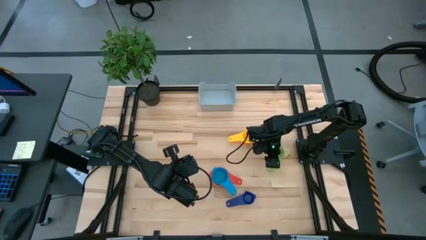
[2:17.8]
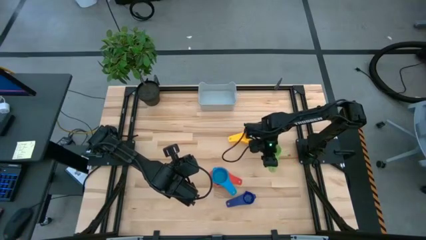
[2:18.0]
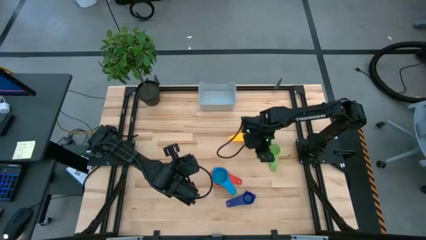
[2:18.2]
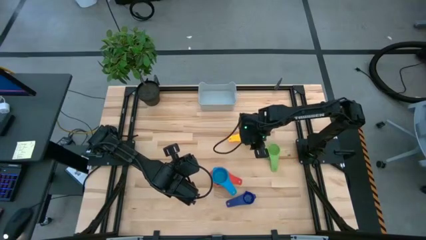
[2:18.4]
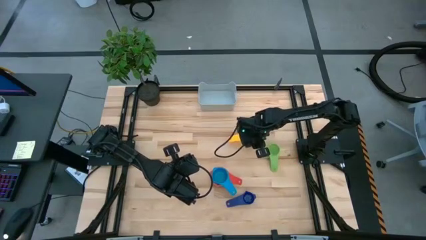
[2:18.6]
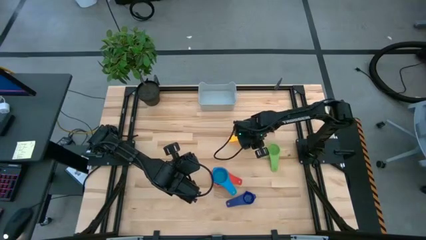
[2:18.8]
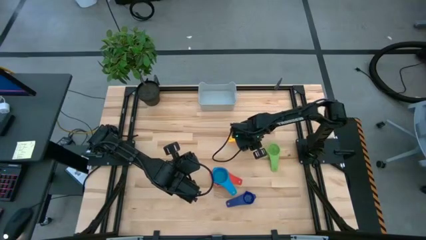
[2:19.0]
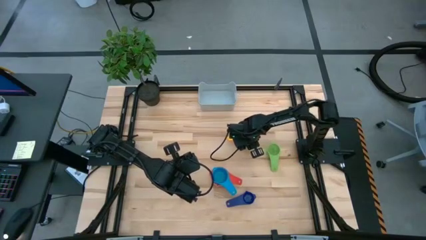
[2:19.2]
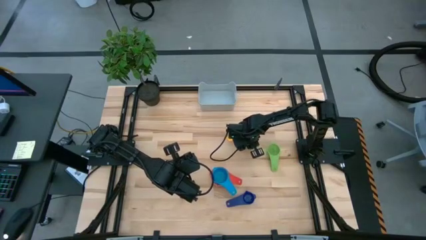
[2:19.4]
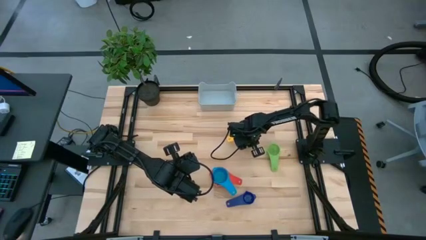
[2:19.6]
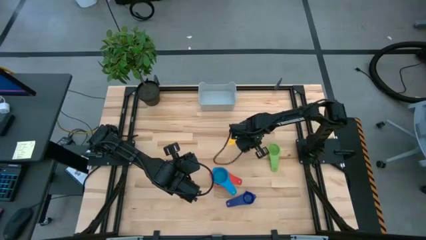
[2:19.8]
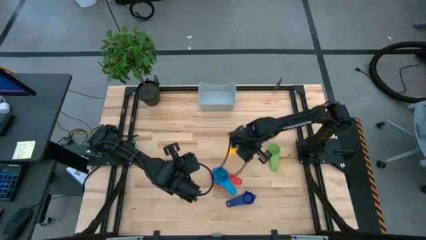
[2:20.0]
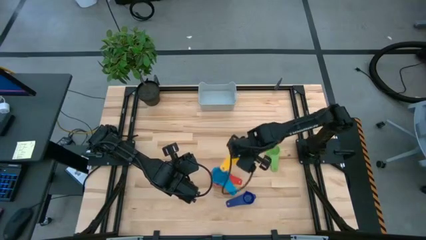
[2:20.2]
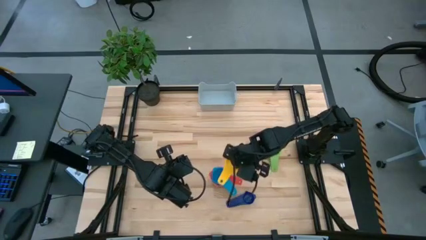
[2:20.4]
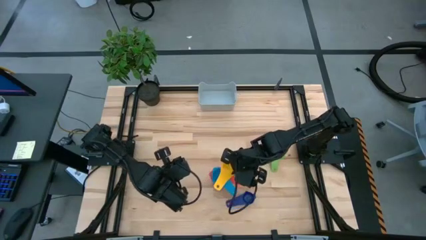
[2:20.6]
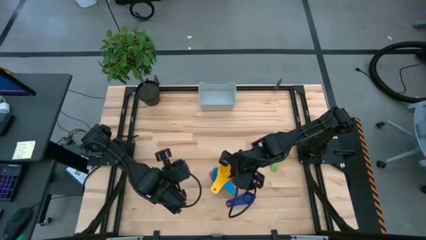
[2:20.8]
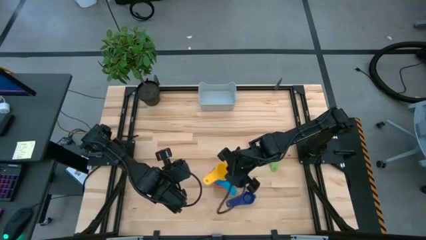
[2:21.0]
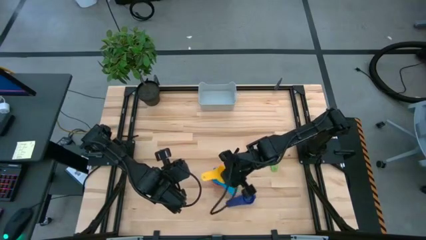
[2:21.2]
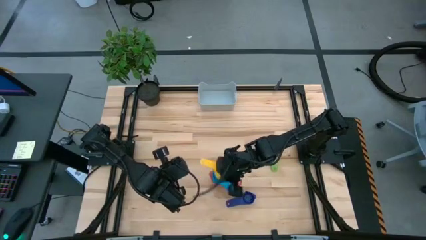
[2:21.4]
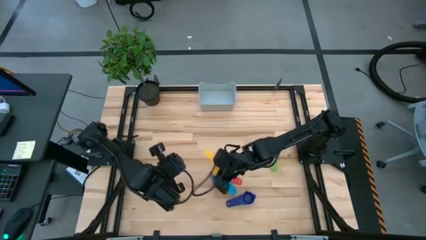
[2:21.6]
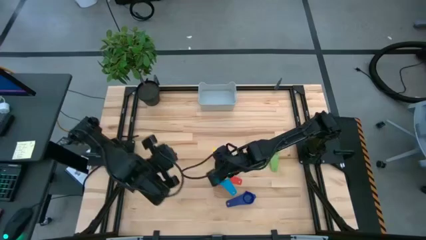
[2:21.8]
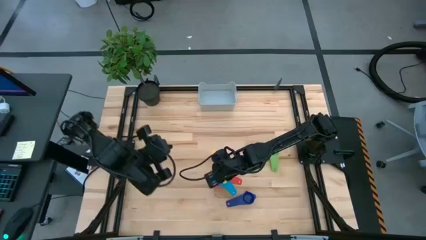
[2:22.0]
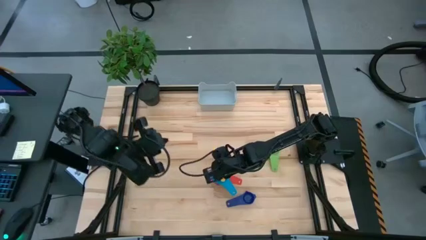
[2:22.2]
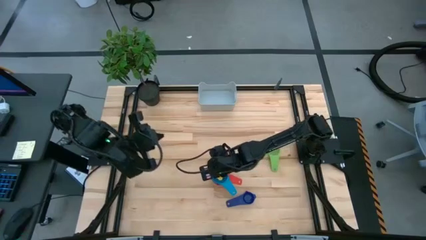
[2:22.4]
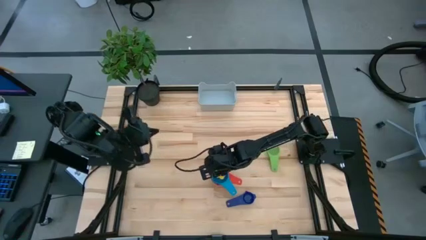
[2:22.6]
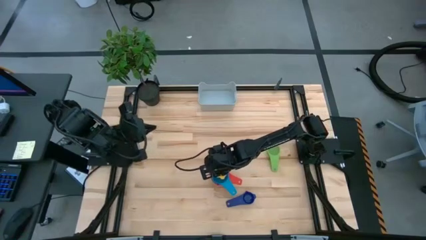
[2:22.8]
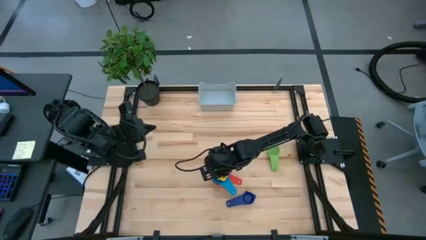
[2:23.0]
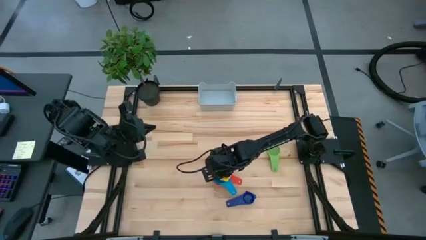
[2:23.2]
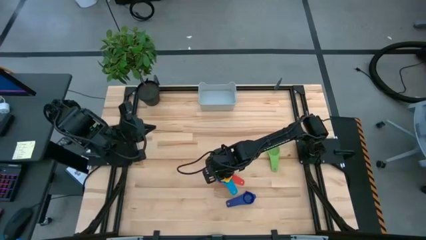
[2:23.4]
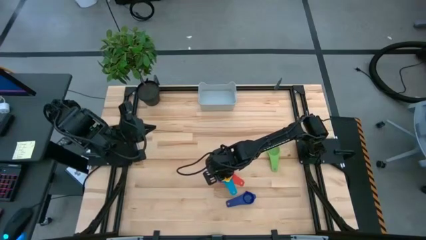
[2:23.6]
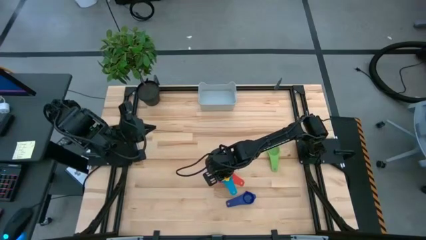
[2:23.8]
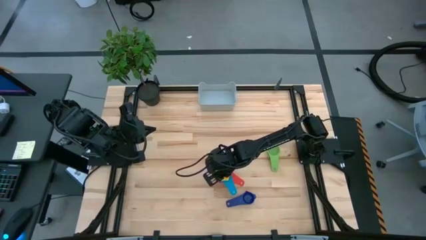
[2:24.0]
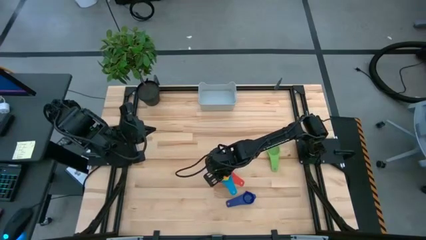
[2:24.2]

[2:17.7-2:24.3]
Task: Nest measuring cups in basket
Stack the yellow measuring cup on top of the light blue measuring cup

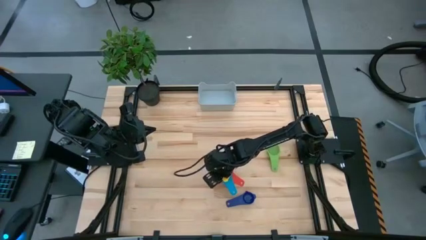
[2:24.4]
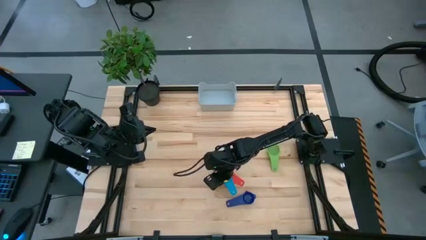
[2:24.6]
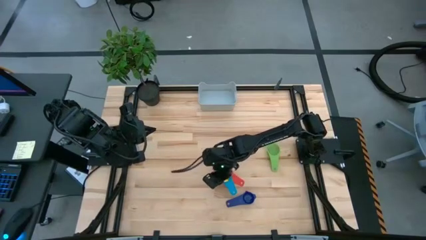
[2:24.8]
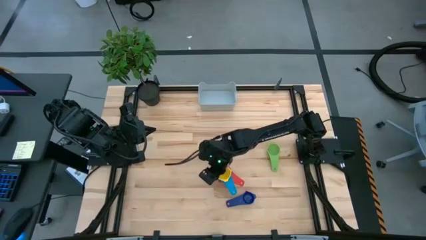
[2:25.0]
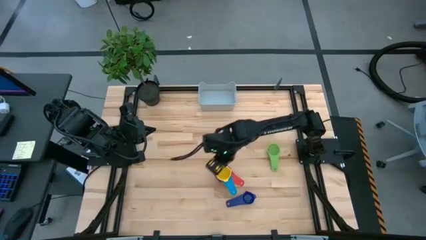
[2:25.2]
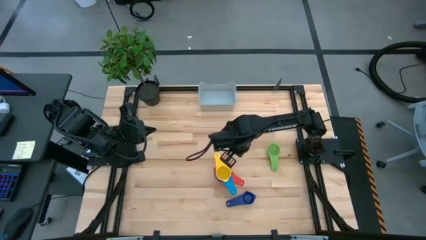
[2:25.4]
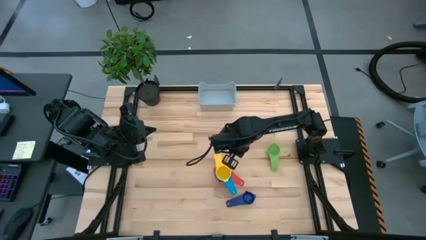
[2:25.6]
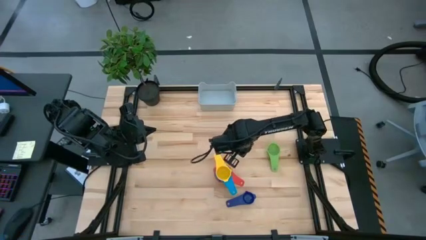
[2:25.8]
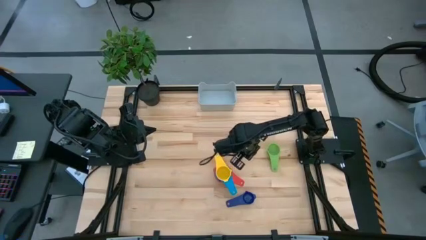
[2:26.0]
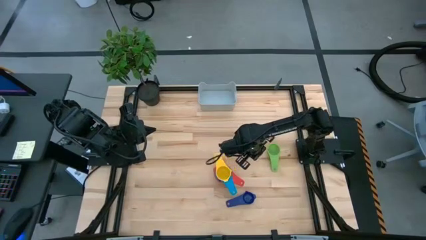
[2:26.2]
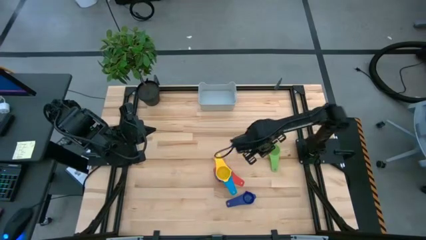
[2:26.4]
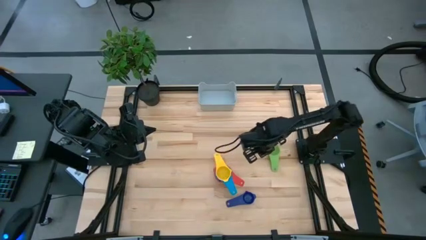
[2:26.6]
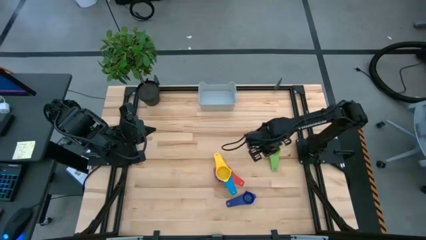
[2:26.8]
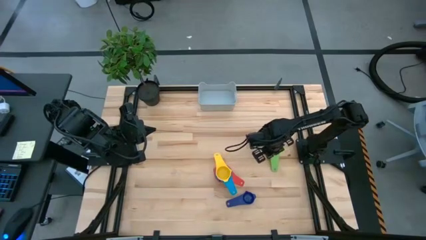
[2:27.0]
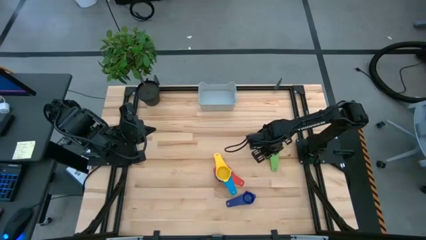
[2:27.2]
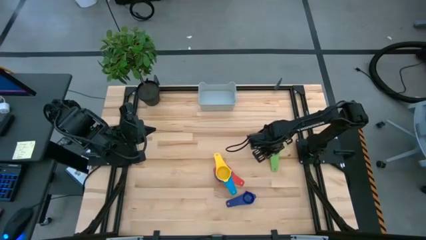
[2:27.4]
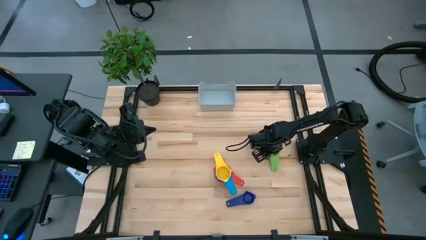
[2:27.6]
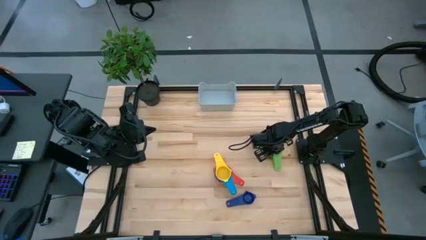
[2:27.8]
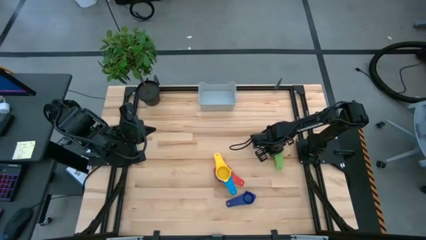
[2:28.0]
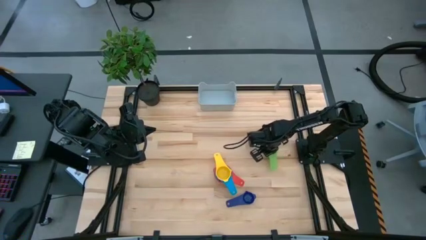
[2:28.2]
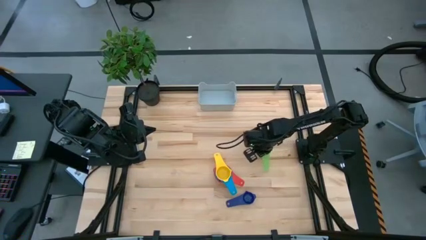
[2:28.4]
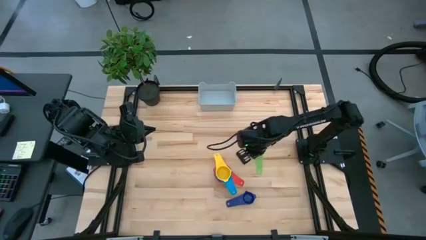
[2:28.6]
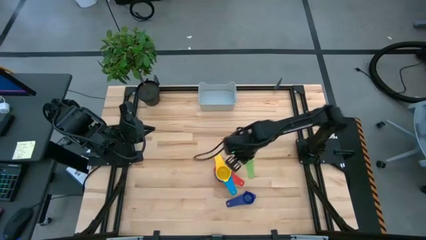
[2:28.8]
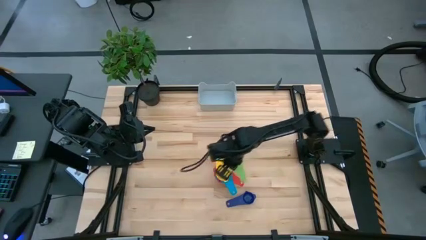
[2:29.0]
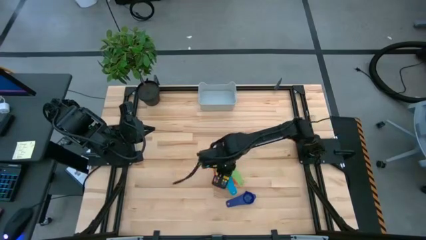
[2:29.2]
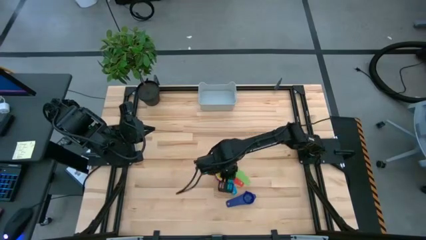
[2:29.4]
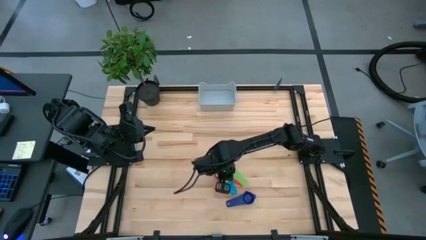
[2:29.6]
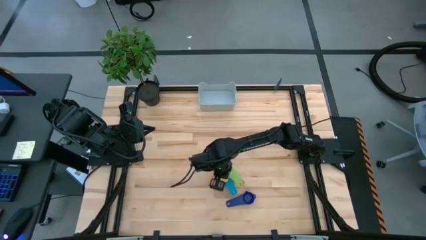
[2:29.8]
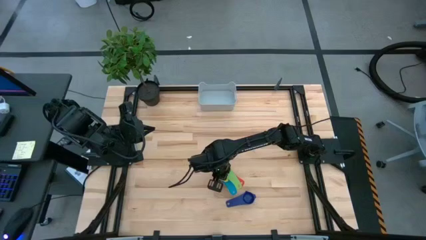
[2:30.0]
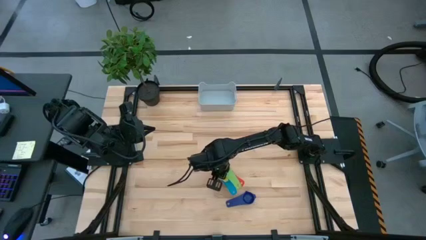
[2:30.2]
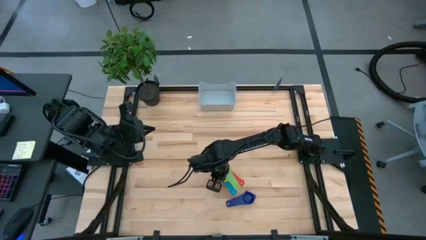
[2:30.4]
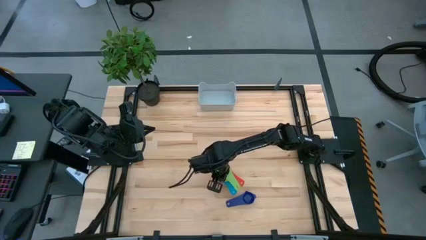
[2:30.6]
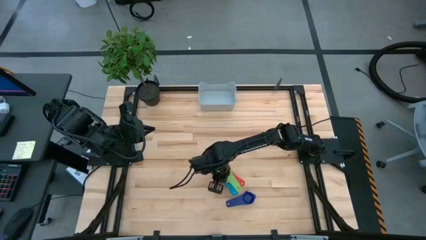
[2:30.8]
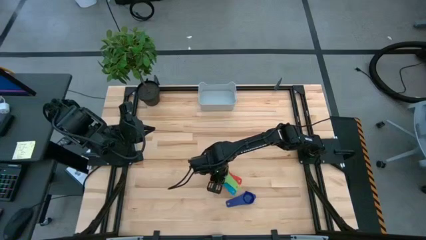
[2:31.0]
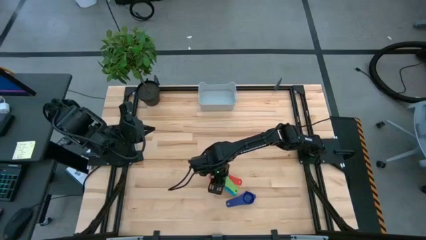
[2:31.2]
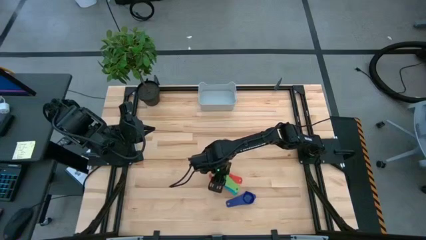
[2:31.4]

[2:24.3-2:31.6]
Stack the green measuring cup on top of the yellow measuring cup

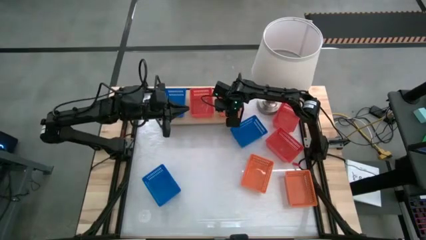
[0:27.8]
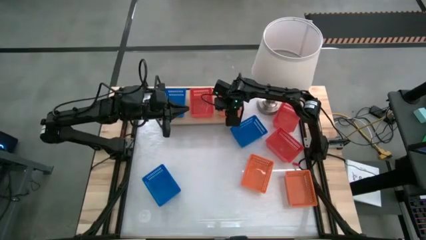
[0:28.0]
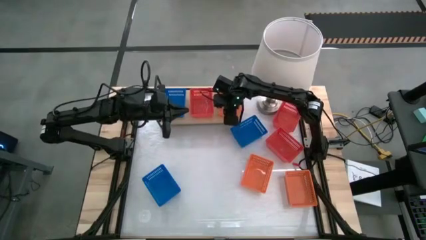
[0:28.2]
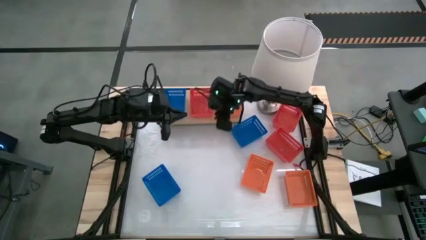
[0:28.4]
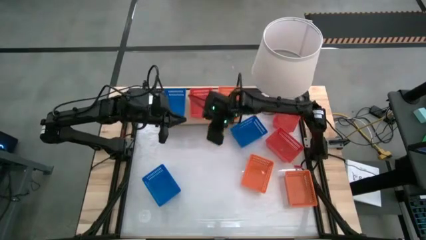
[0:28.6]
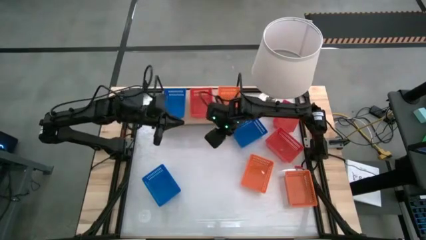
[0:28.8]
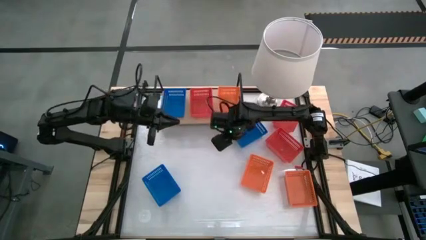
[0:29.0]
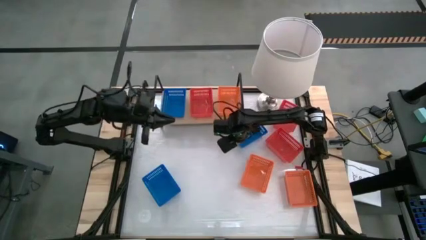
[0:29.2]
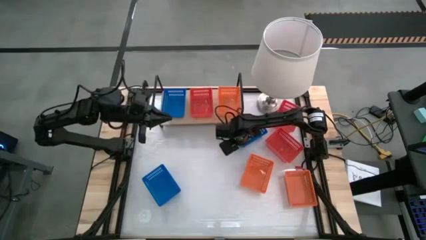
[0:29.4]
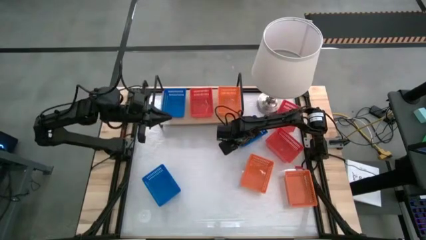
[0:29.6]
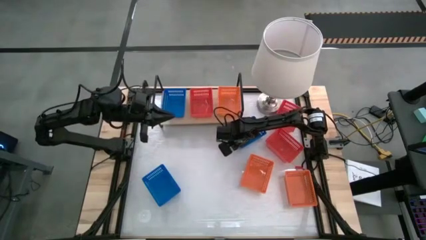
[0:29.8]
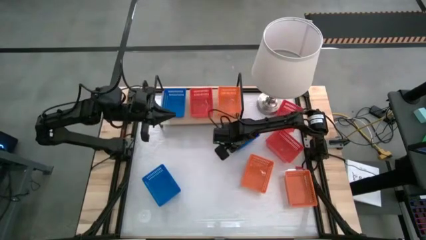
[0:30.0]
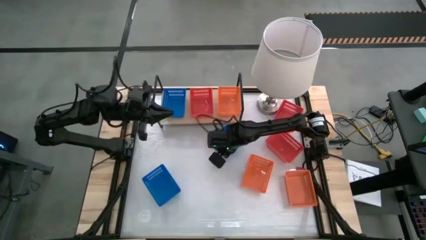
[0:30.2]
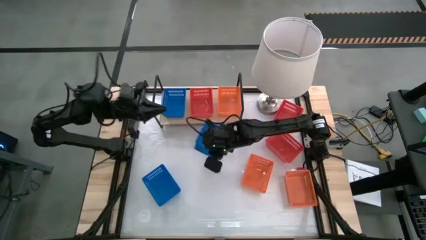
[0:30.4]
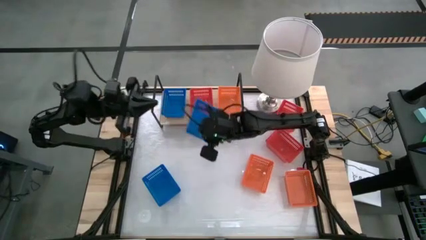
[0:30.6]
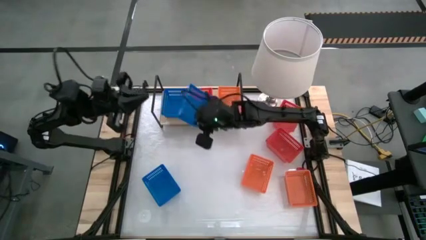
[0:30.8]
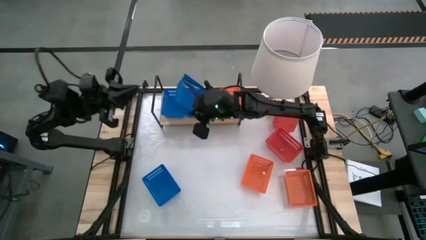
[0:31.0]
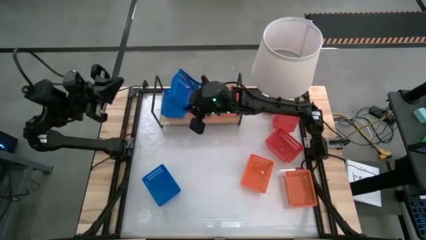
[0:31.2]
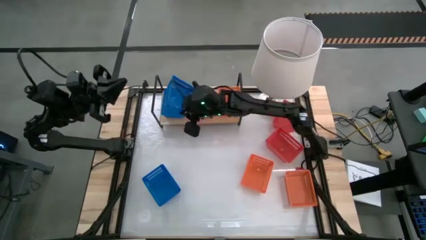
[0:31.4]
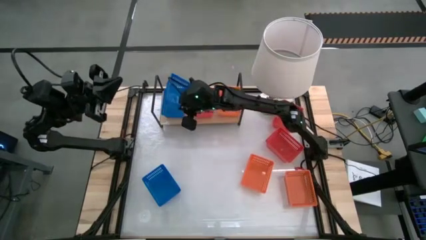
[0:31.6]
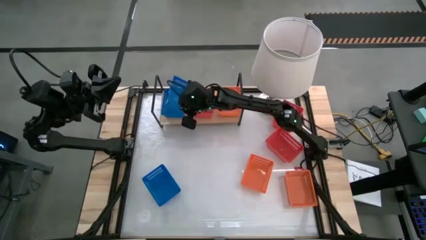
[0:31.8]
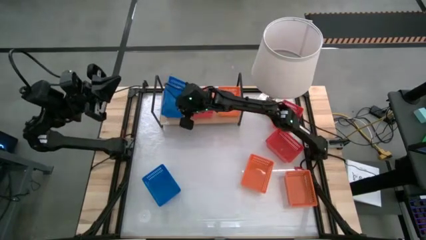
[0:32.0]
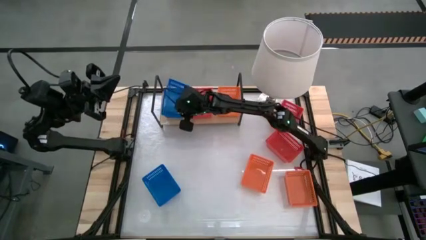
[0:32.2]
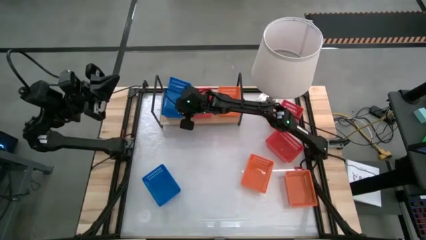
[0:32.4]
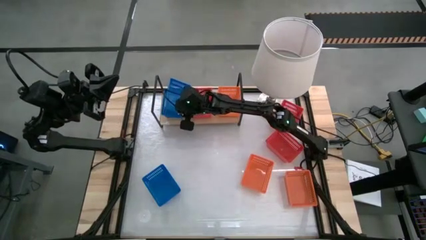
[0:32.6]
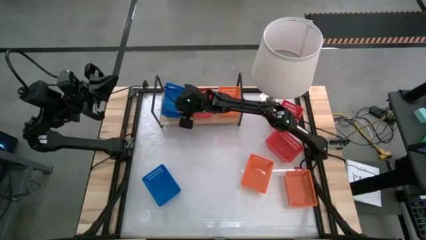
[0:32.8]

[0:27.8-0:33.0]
Task: Stack baskets on shelf by color
Stack the top blue basket on top of the blue basket on the shelf
